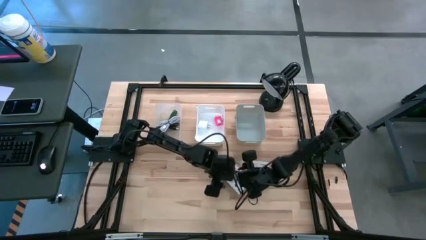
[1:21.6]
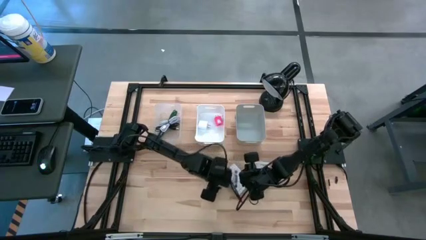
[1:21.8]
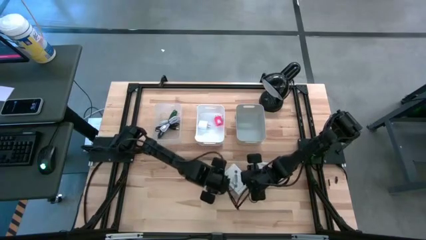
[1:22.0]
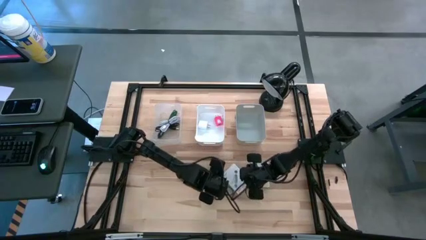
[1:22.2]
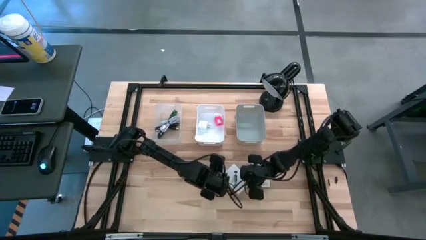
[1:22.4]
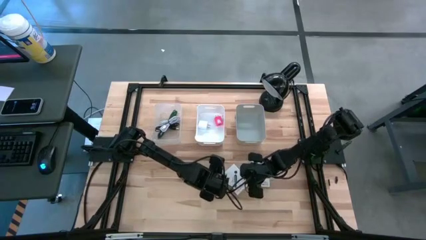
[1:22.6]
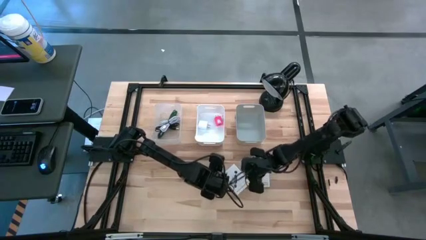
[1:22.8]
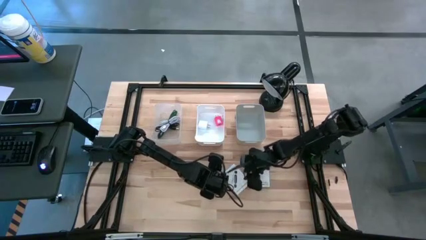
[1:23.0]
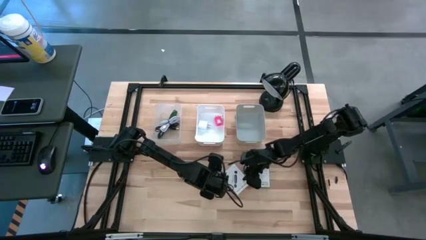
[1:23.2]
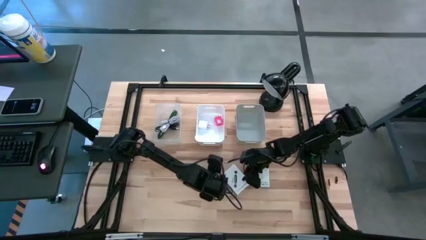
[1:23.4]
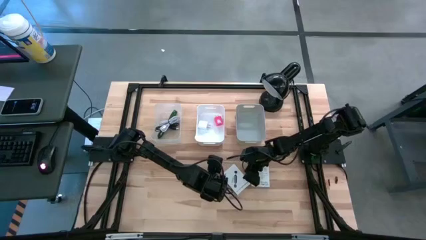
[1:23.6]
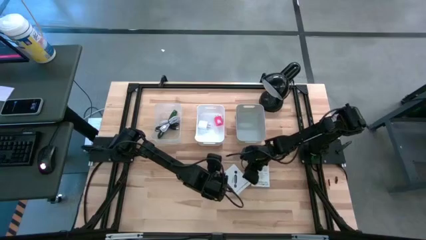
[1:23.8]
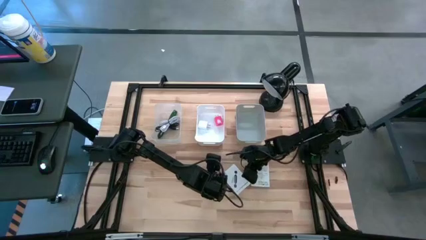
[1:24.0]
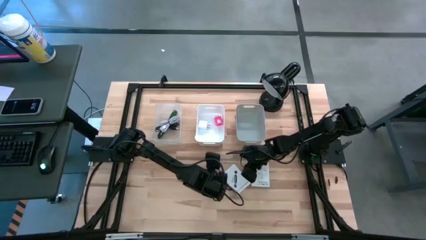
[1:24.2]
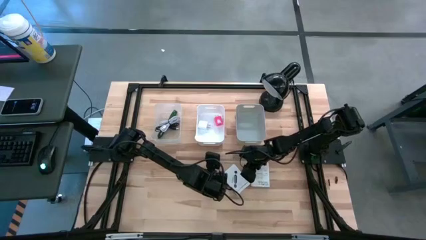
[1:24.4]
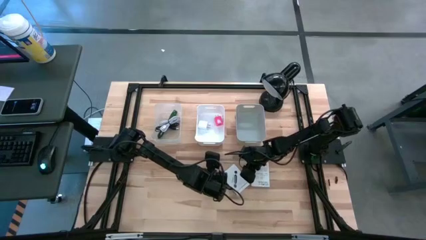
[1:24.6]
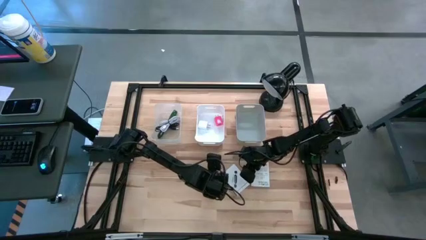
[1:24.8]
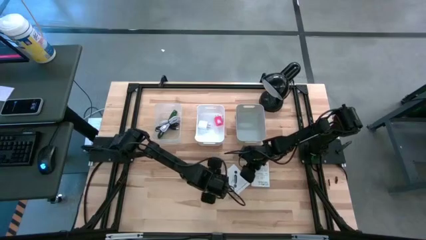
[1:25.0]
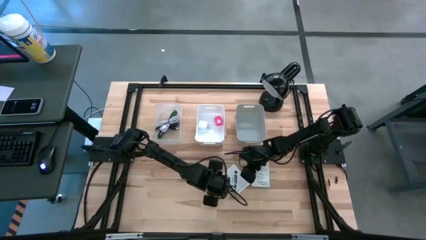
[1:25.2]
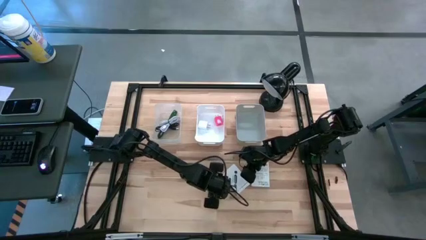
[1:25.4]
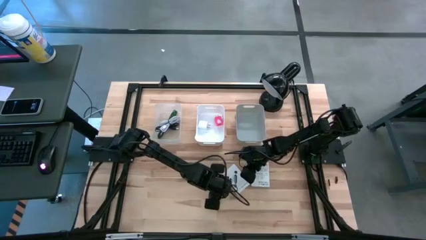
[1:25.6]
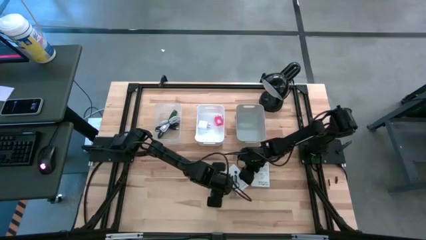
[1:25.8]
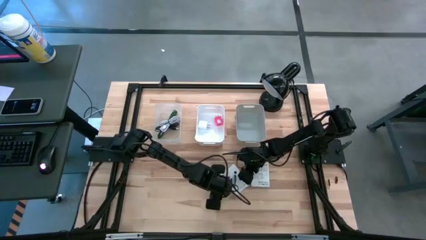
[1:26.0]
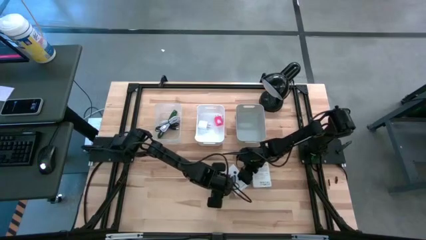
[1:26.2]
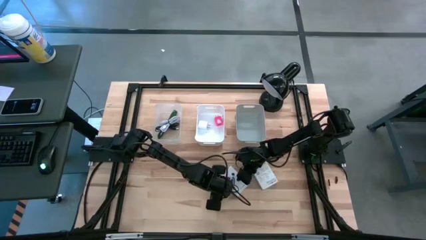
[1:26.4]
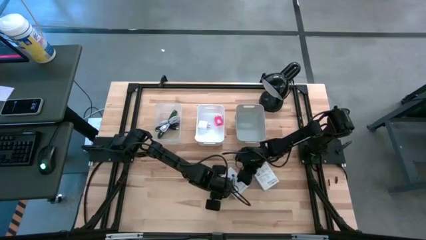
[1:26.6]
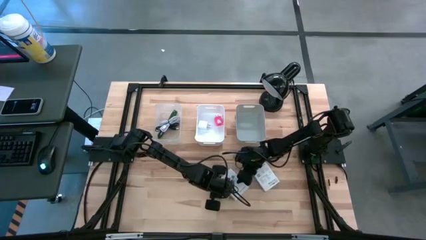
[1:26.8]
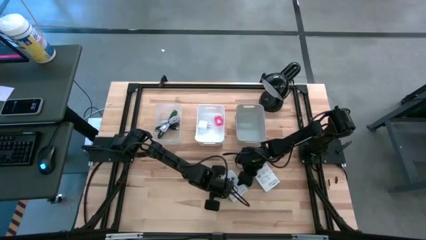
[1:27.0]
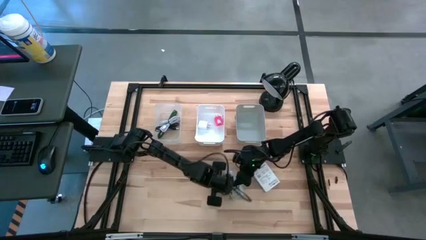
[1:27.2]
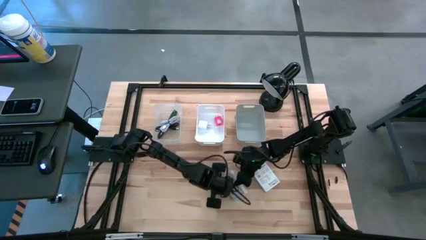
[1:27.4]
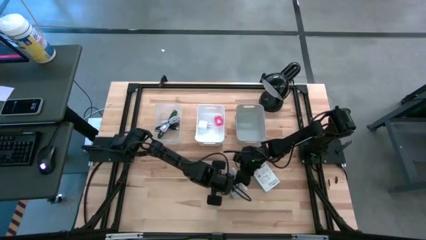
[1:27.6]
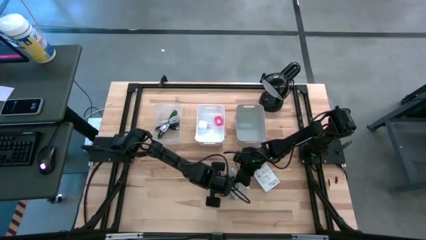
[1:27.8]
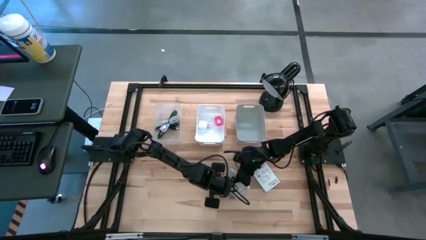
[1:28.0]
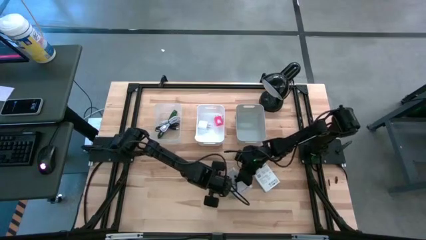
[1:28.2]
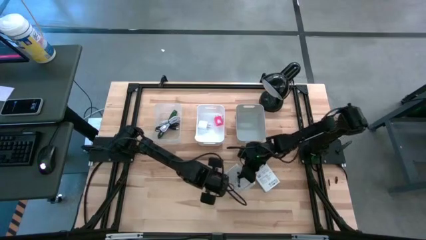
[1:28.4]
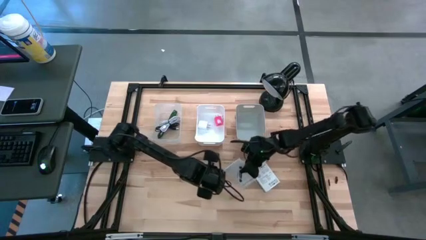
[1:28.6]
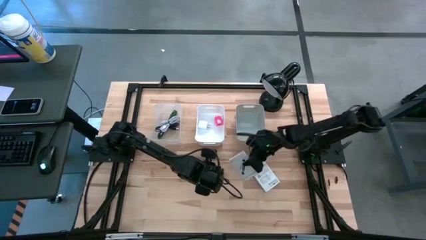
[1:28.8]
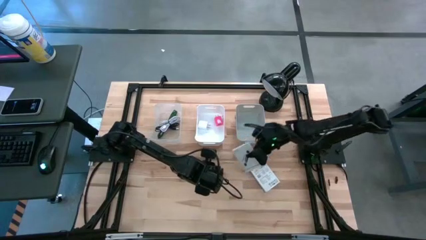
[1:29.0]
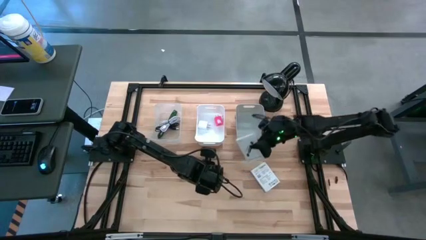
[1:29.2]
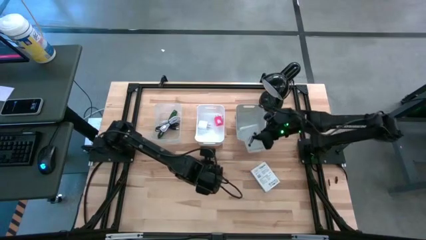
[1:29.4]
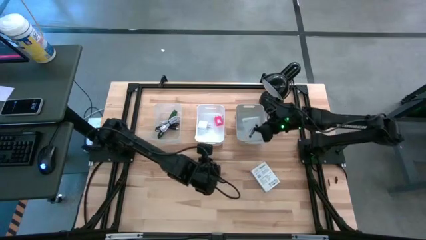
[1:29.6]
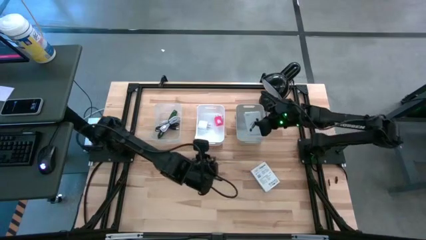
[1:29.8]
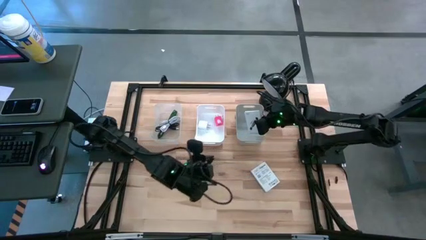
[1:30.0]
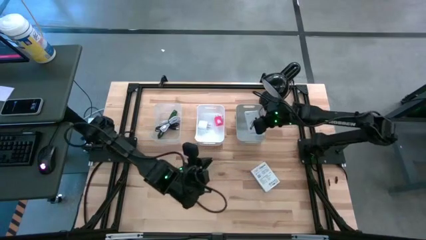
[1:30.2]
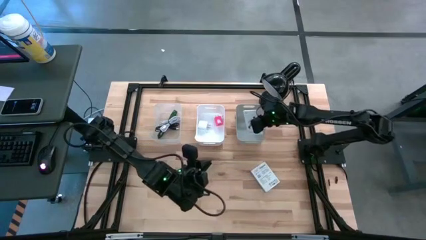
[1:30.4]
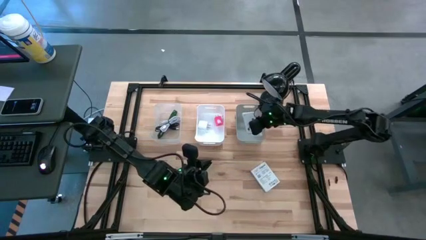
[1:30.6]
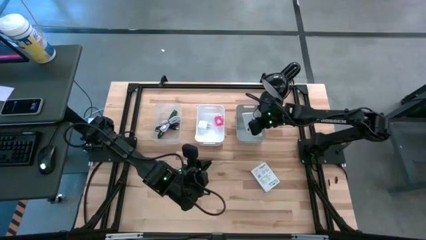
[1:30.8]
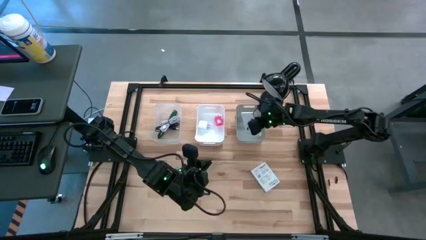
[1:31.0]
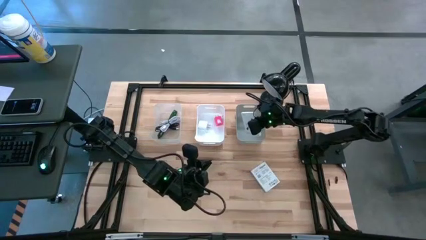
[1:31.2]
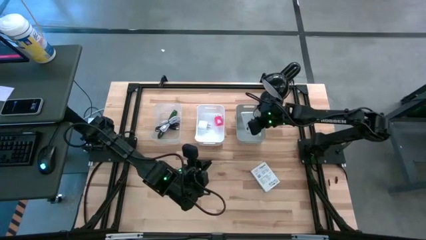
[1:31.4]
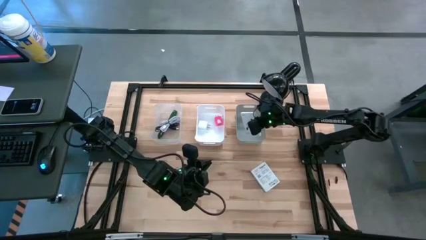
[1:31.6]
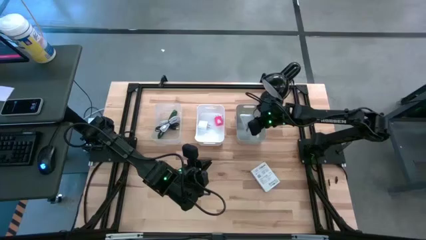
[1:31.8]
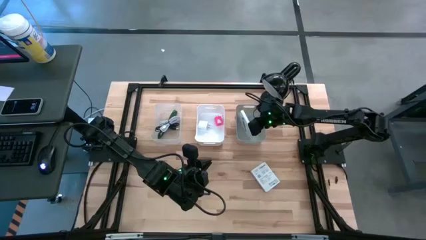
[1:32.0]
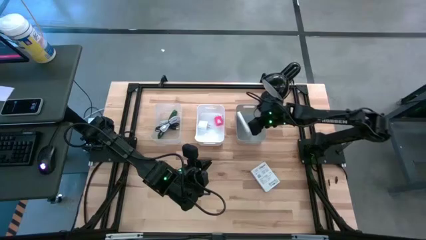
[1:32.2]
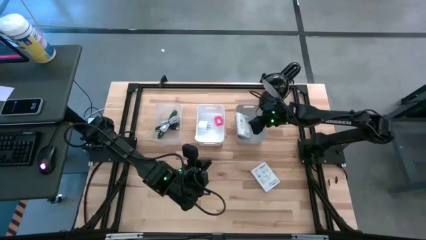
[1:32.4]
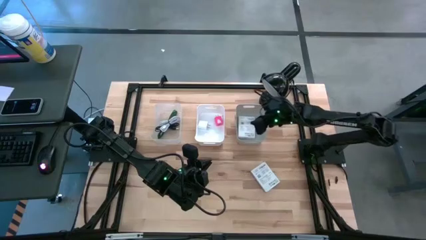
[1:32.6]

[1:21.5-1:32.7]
Task: Pick and place items into bin
Put the left card reader into the gray bin
